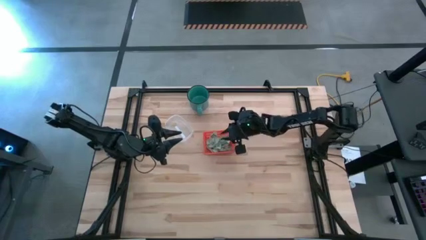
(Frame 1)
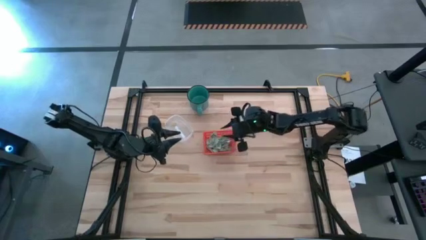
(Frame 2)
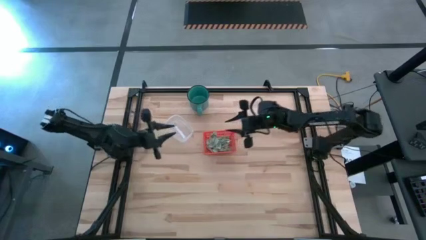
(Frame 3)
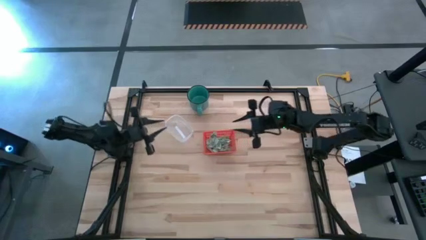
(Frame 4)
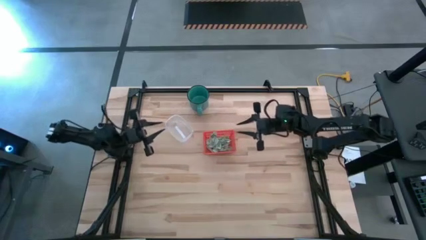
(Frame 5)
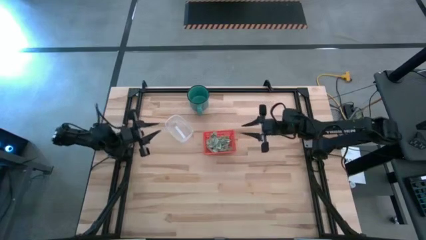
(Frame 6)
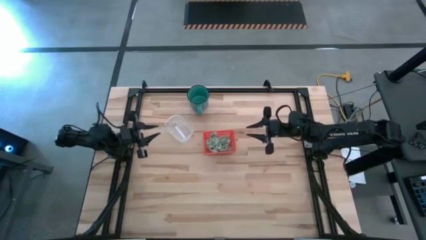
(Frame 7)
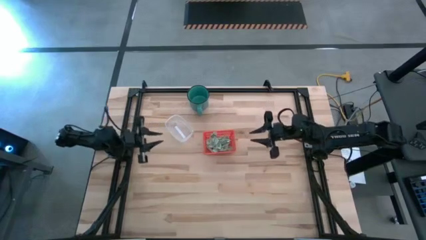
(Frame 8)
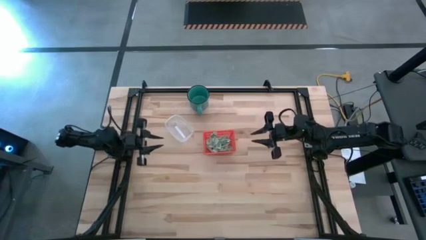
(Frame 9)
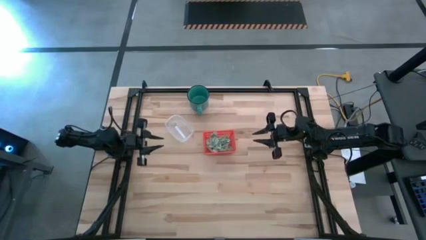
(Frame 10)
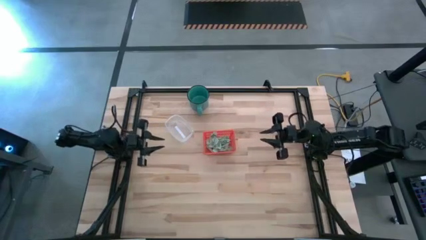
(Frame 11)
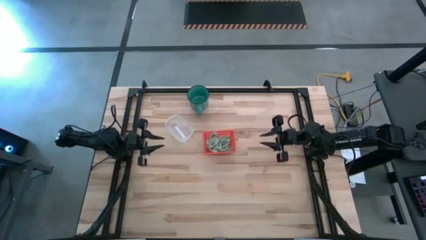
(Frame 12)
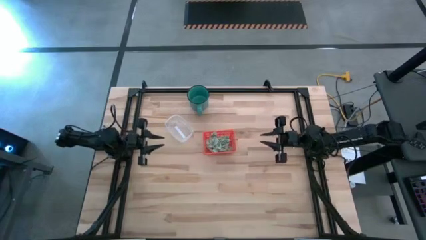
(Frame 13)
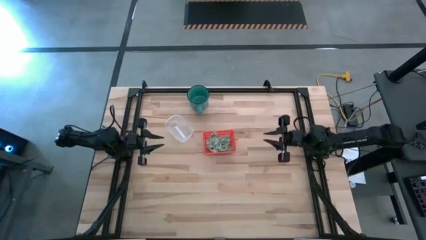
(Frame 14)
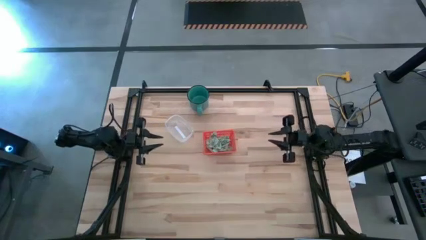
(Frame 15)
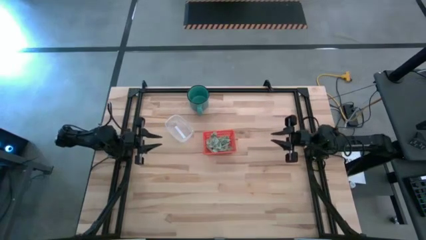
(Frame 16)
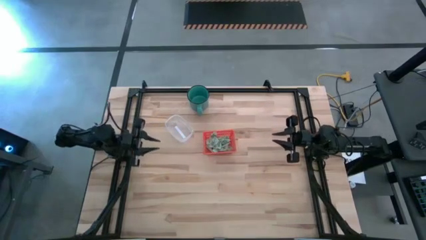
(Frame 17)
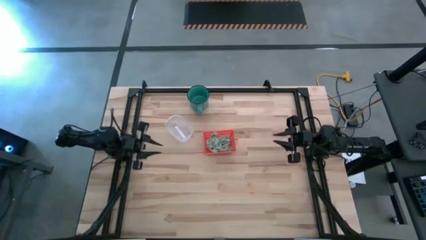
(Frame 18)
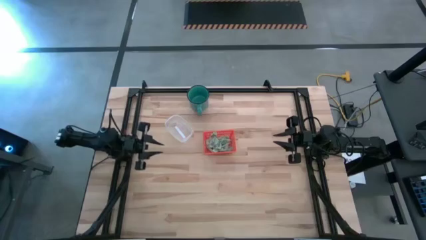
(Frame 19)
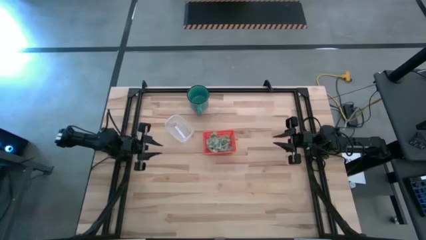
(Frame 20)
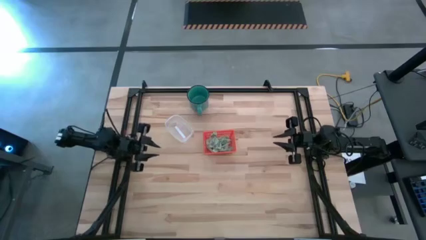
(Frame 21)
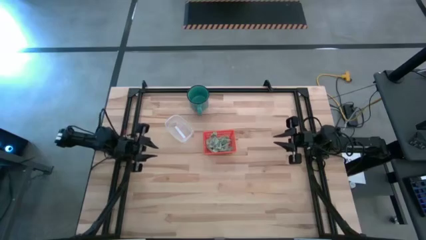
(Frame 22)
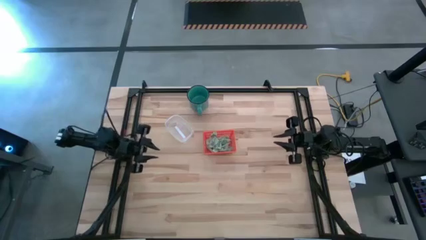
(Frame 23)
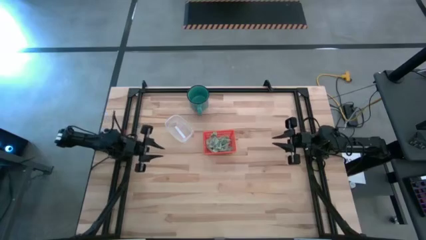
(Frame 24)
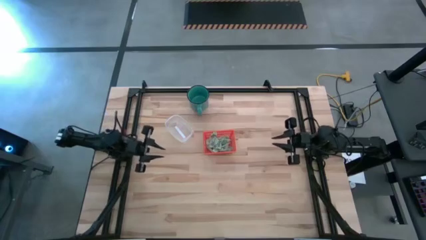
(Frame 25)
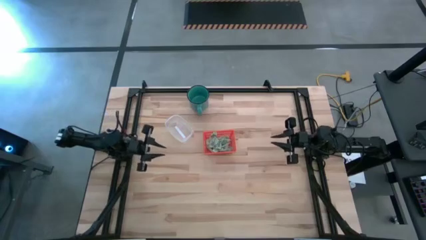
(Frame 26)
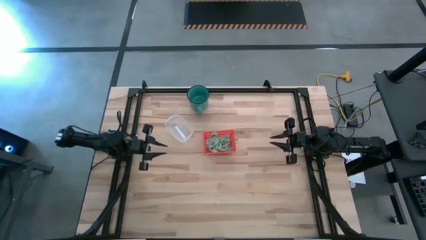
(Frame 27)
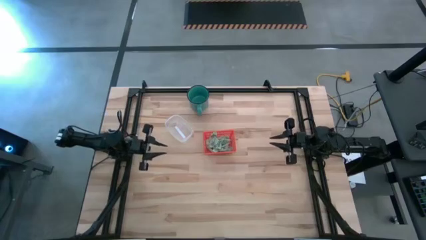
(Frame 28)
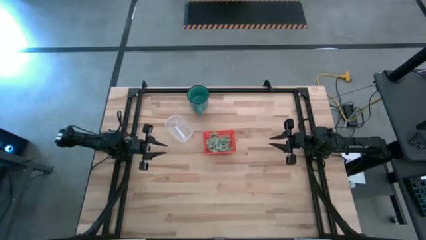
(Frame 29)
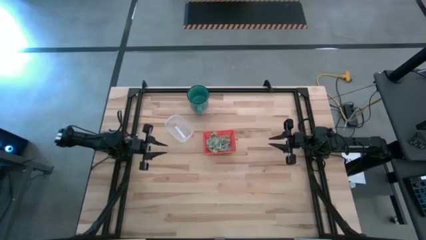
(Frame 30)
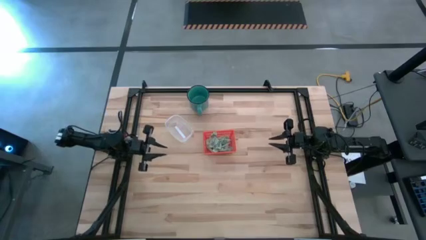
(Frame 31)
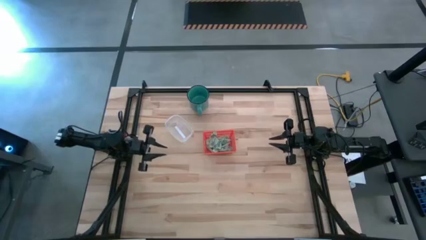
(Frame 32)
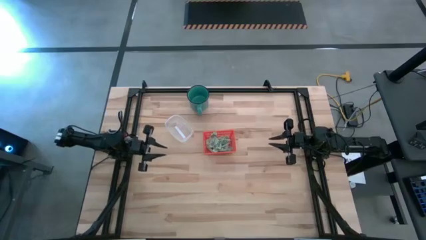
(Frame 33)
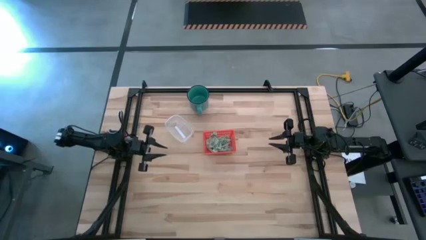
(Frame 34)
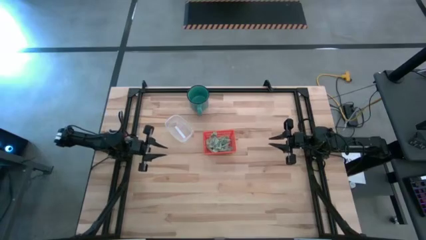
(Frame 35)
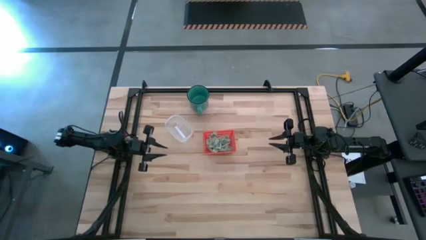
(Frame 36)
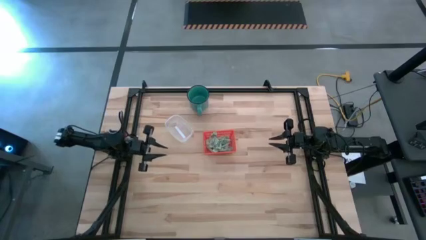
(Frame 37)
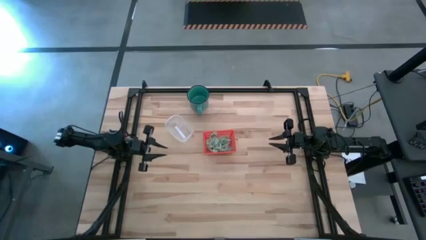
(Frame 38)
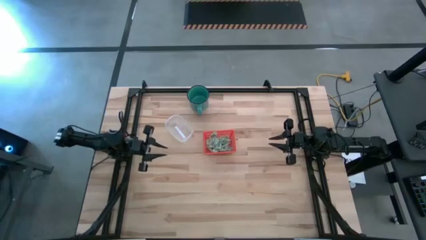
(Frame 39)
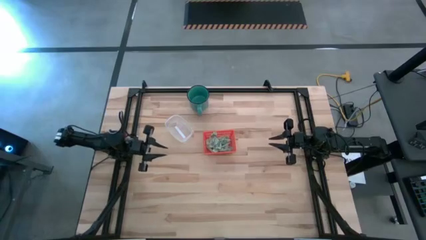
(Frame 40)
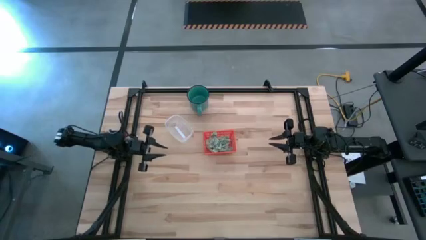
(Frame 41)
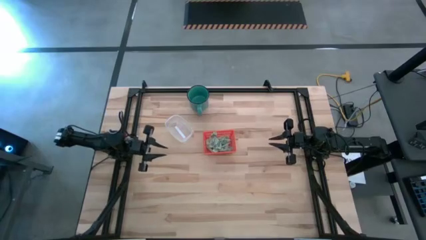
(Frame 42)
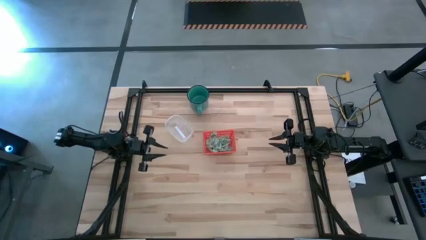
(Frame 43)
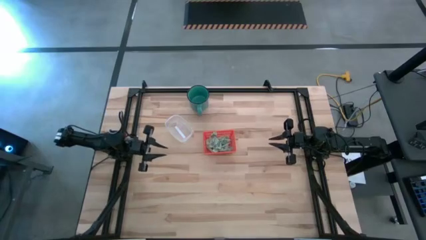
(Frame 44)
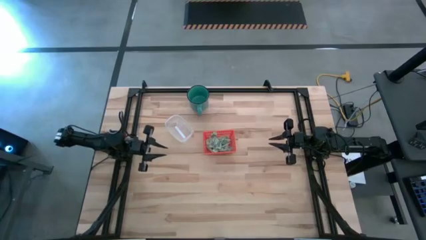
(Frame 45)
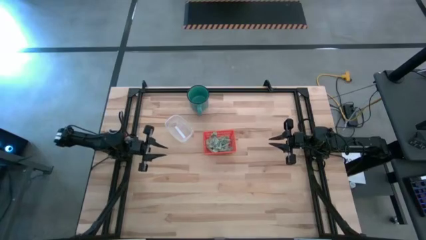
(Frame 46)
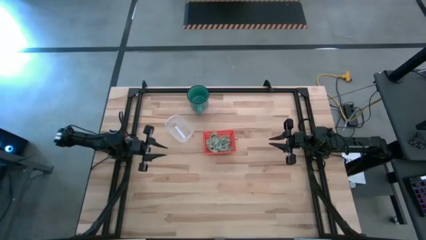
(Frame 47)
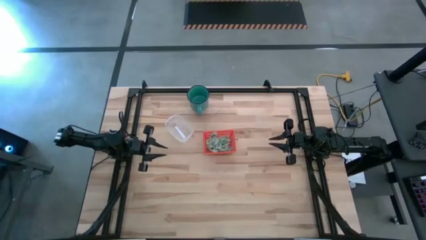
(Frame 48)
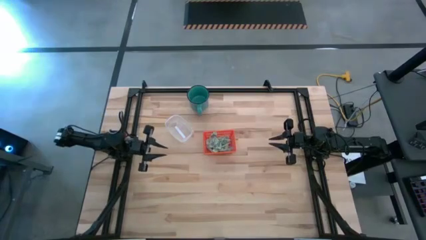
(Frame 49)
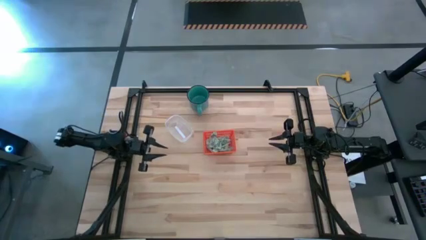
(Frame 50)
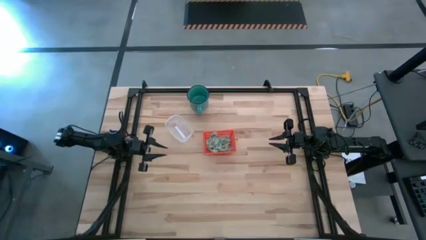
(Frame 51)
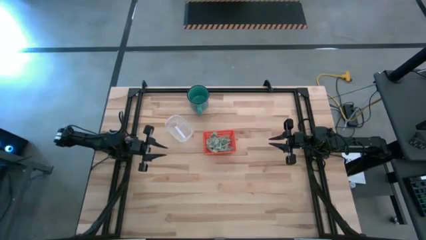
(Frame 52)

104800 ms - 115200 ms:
Task: Pick and place items into bin
Return to Home Position

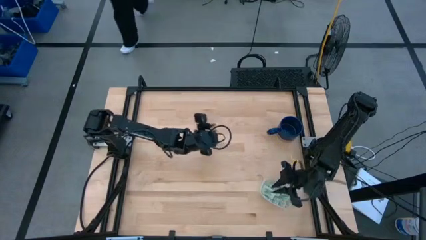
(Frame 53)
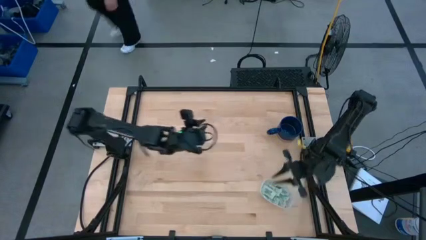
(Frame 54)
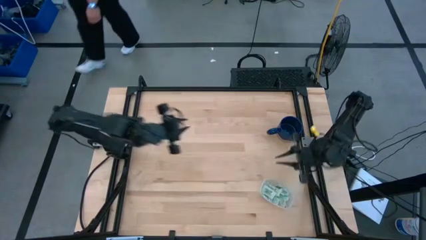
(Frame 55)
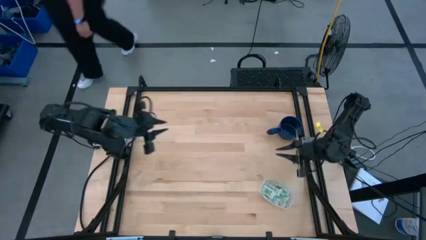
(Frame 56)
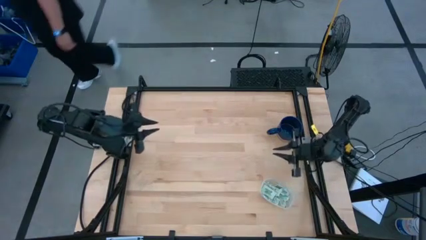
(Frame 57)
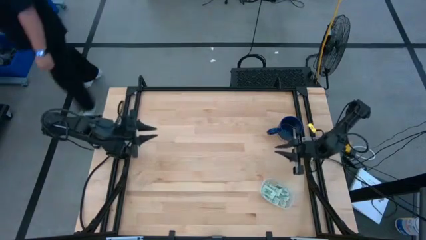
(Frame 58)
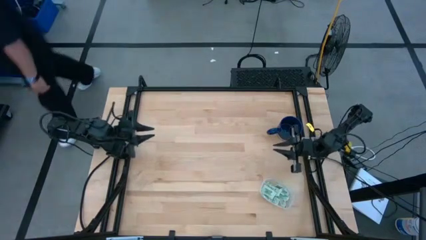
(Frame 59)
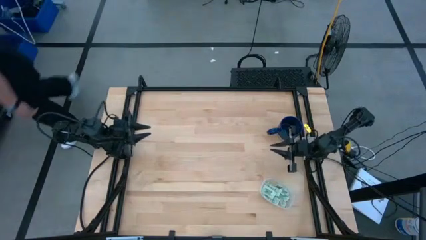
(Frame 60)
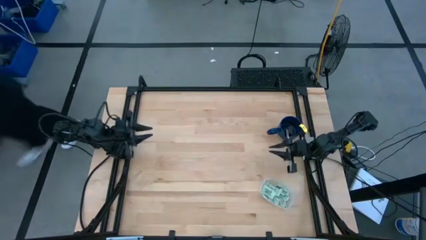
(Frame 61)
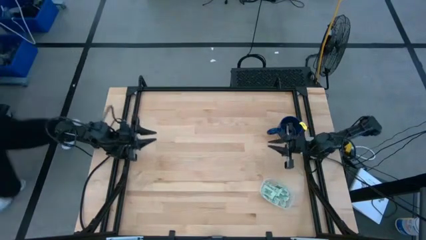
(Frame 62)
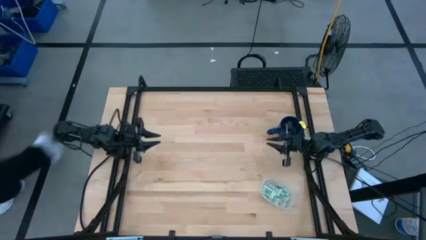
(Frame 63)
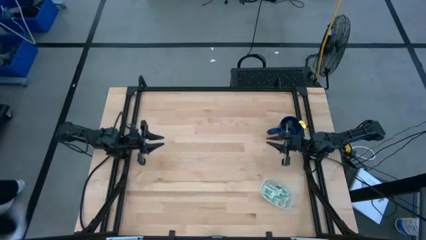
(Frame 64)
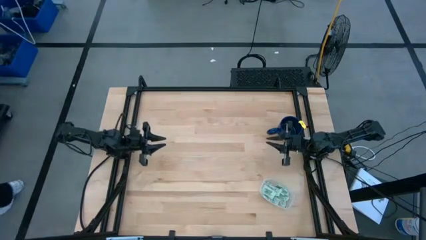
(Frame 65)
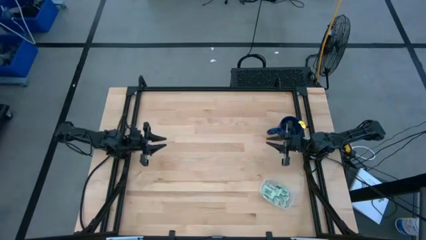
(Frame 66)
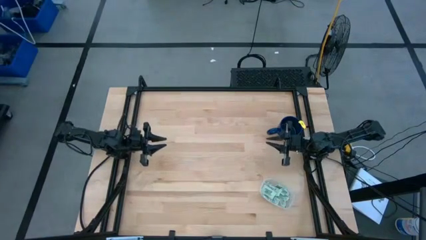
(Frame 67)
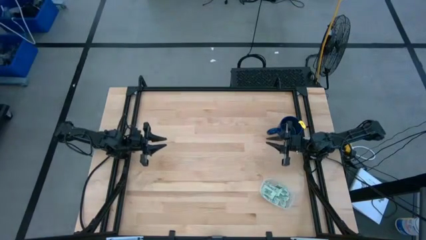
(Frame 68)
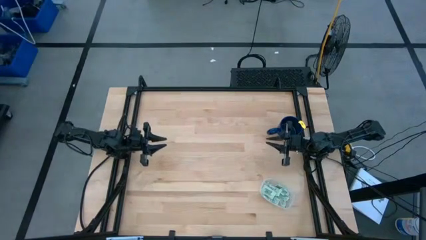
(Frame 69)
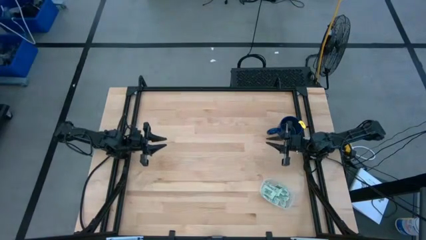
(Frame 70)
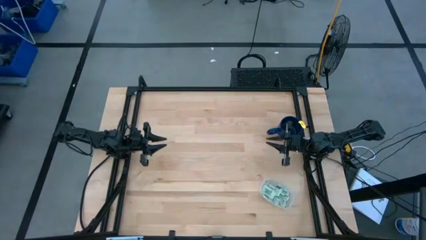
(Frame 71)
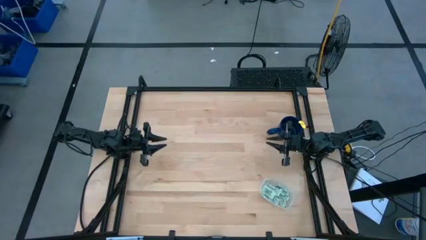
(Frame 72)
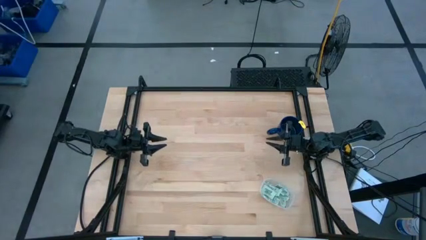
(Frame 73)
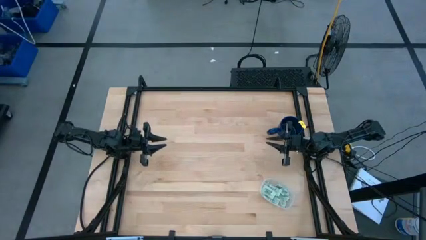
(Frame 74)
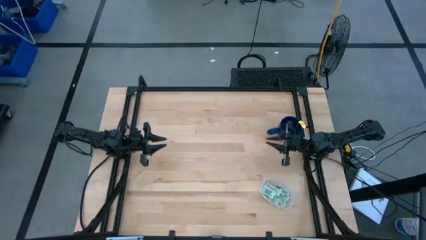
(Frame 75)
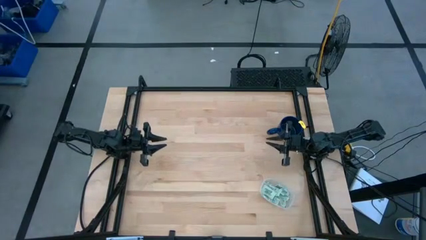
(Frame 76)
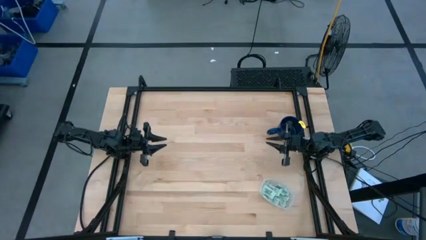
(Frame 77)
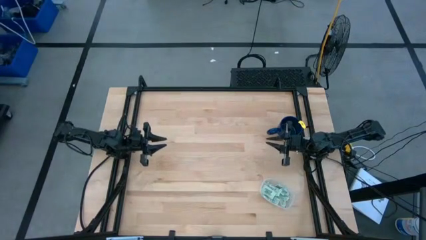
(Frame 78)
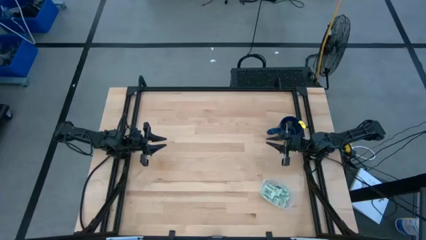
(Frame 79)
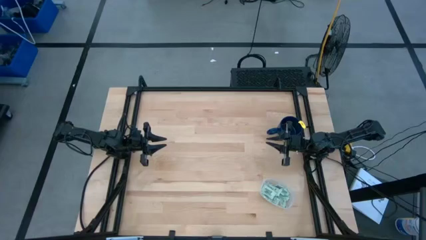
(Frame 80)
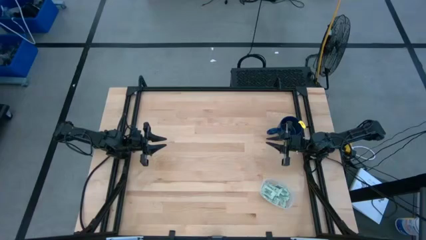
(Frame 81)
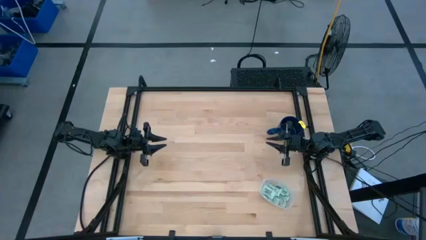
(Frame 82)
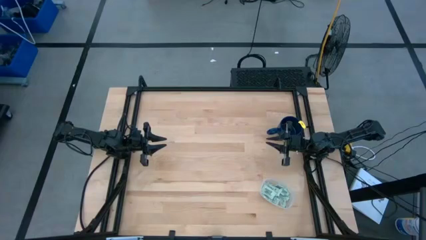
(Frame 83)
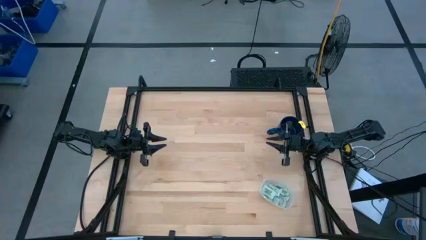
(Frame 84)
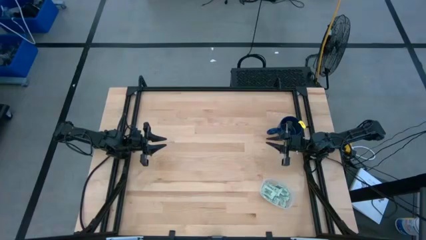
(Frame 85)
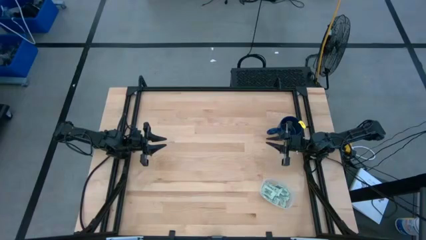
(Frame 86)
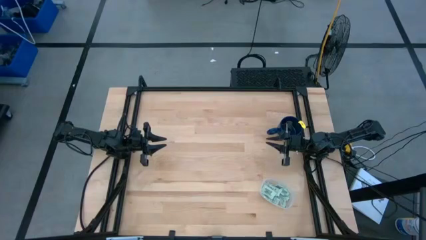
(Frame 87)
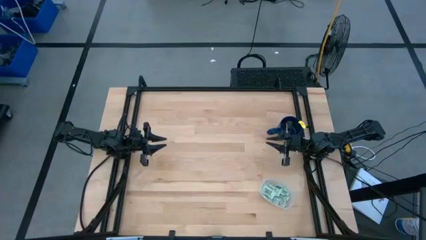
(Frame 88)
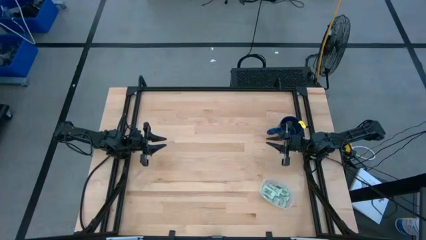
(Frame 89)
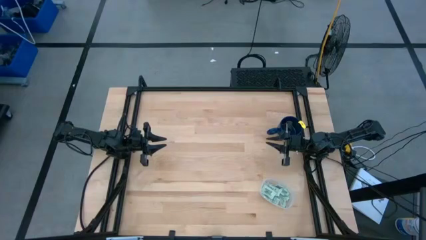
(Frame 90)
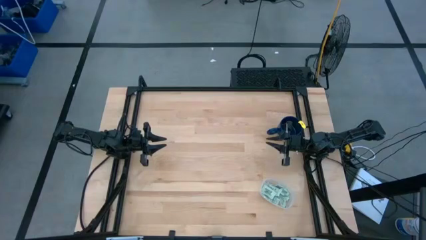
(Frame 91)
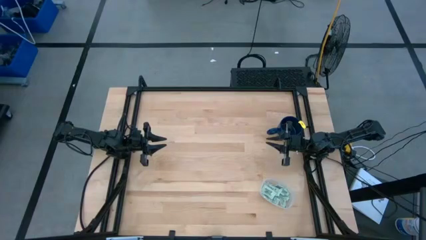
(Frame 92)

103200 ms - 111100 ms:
Task: Pick and place Stevia / Truvia into bins
Return to Home Position
